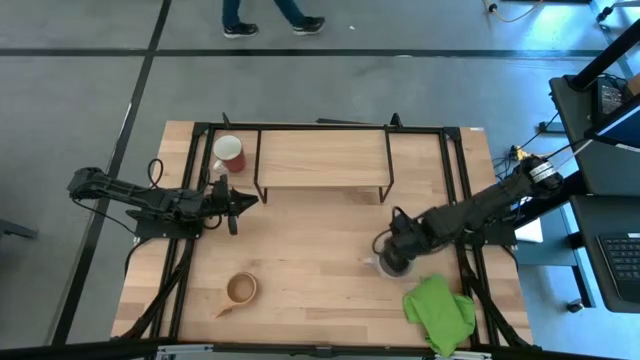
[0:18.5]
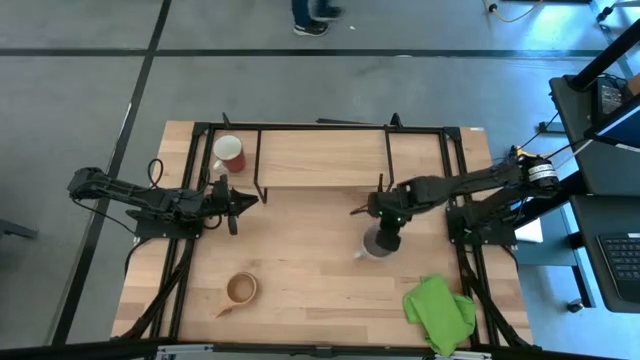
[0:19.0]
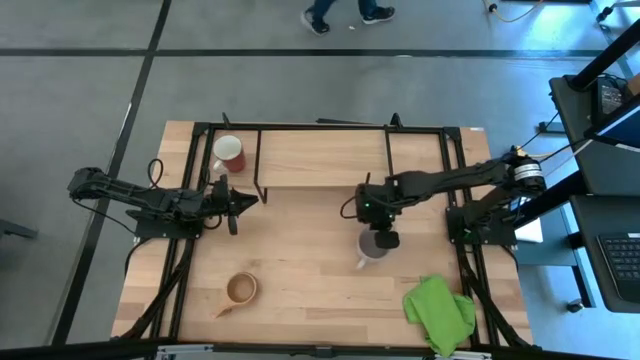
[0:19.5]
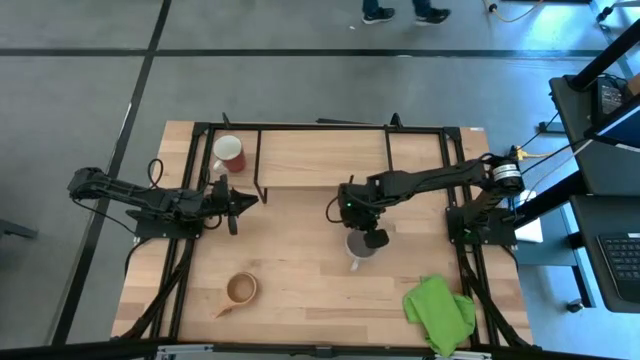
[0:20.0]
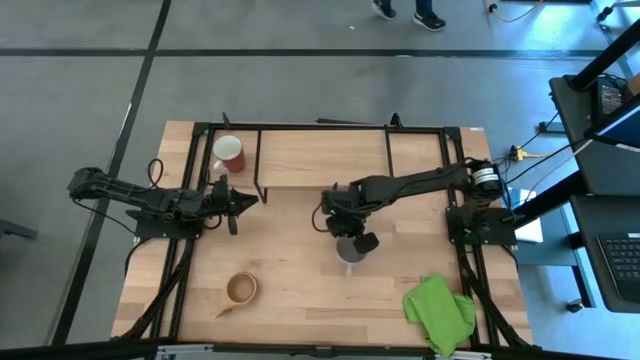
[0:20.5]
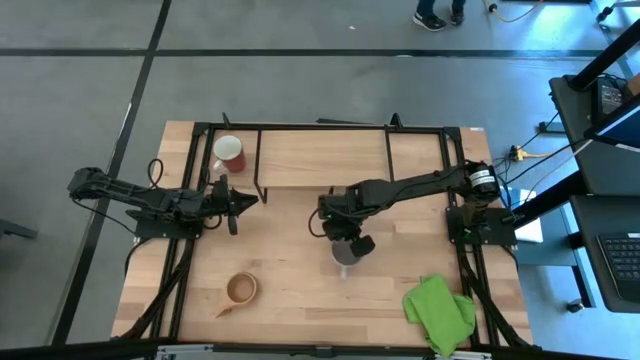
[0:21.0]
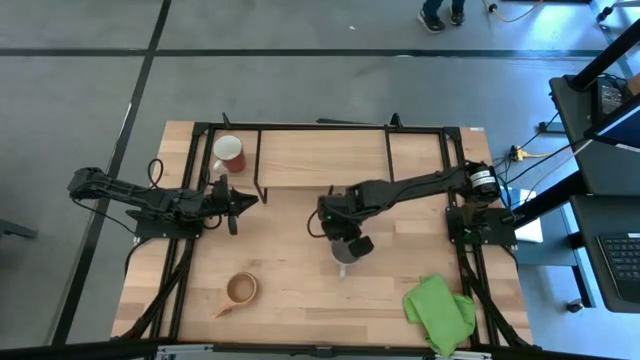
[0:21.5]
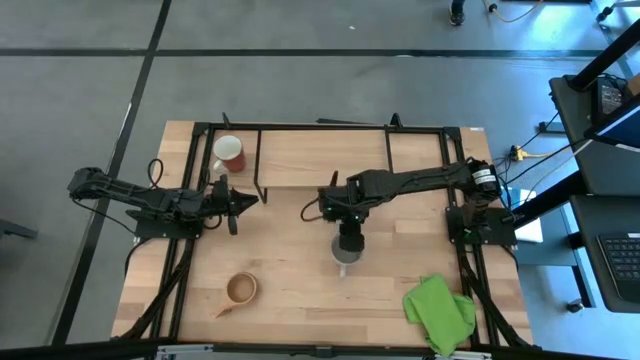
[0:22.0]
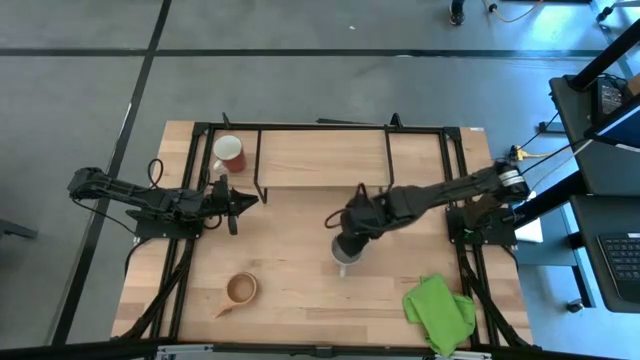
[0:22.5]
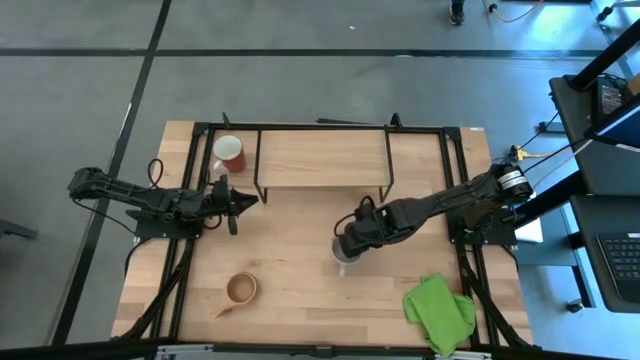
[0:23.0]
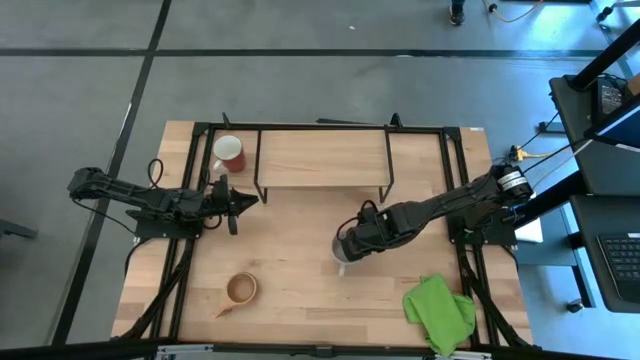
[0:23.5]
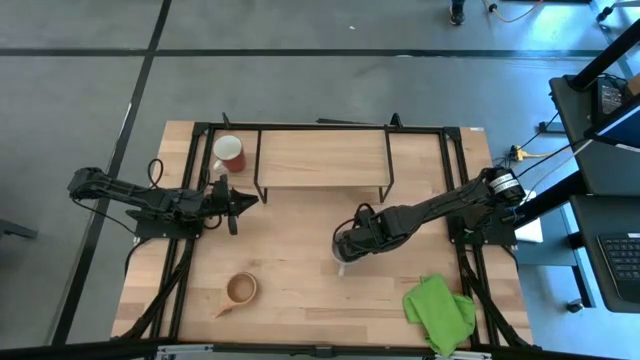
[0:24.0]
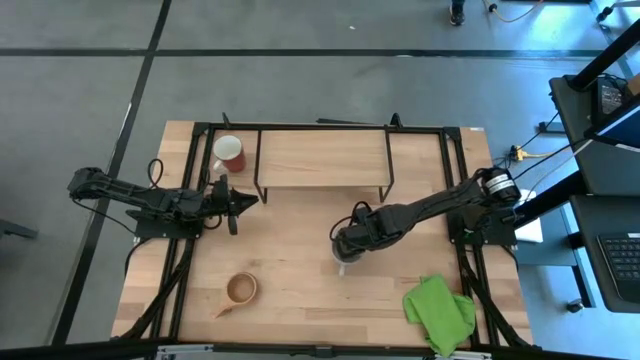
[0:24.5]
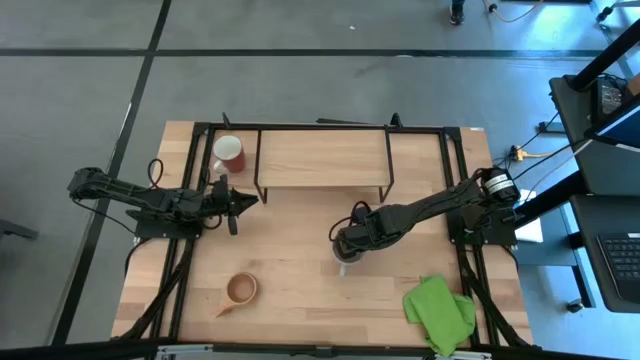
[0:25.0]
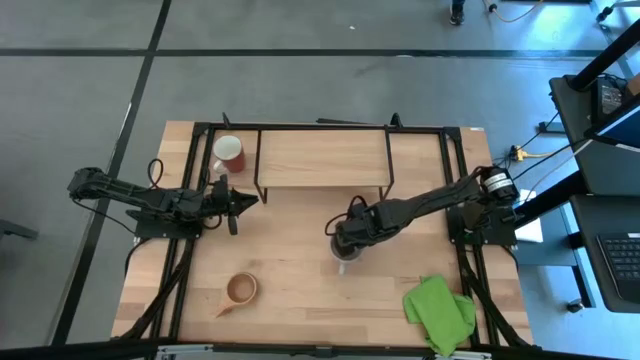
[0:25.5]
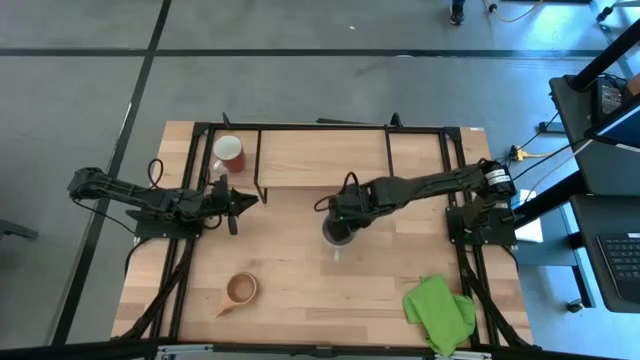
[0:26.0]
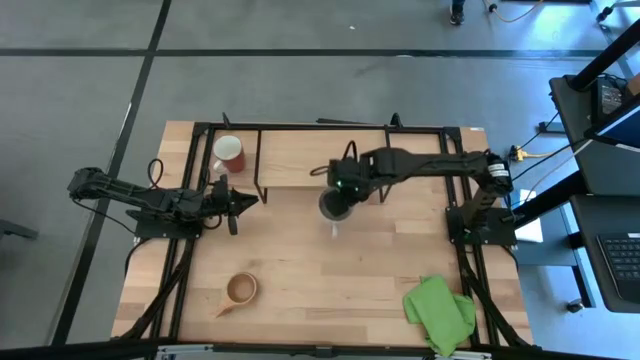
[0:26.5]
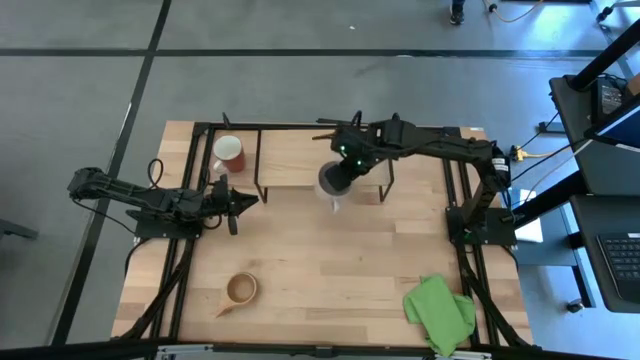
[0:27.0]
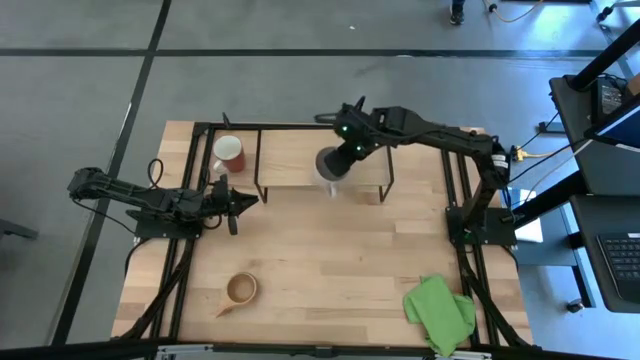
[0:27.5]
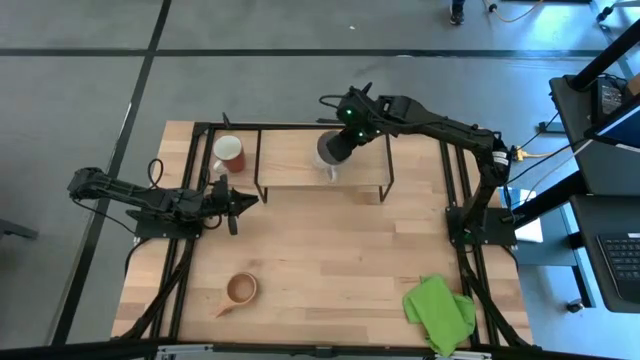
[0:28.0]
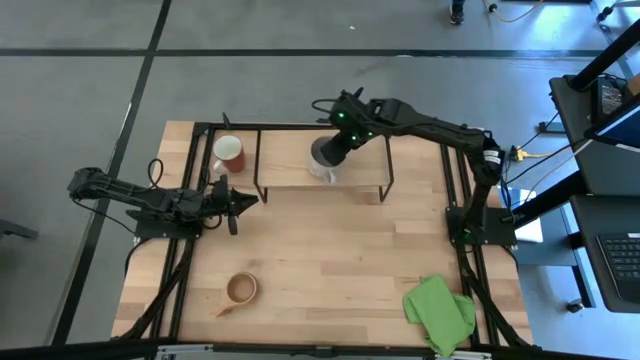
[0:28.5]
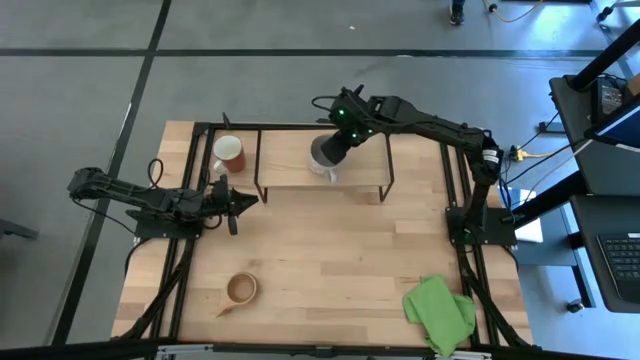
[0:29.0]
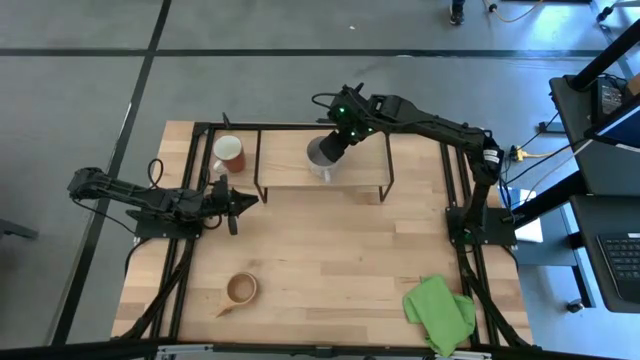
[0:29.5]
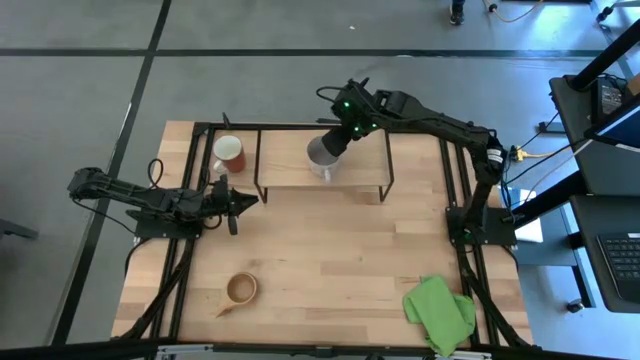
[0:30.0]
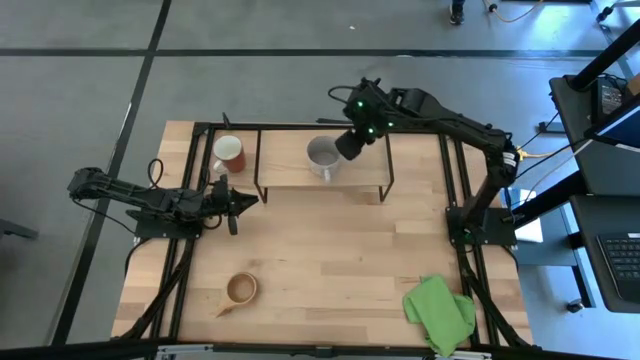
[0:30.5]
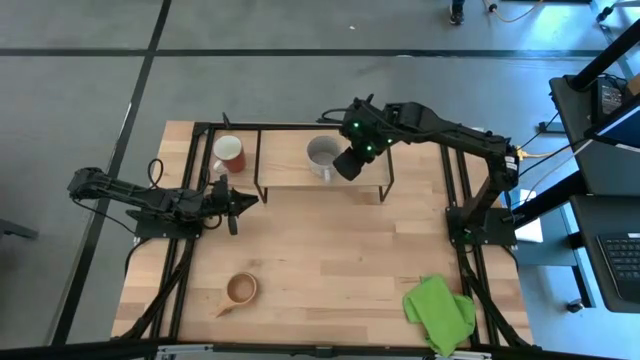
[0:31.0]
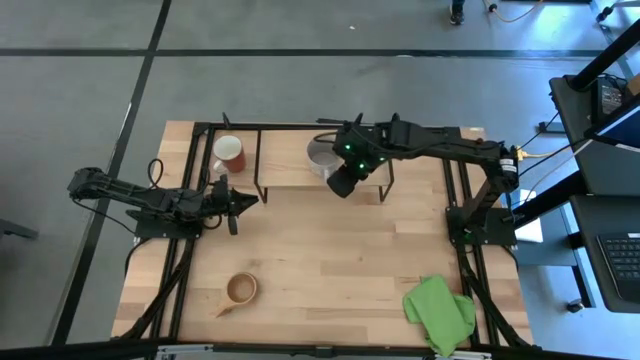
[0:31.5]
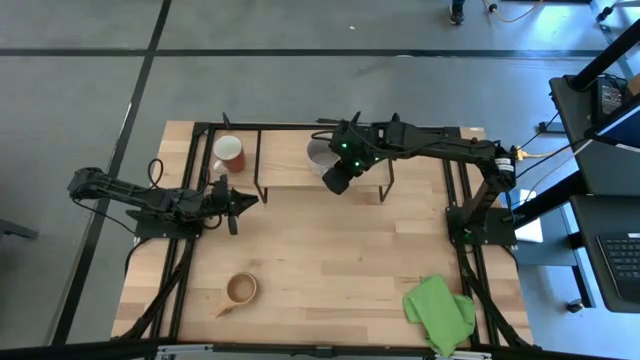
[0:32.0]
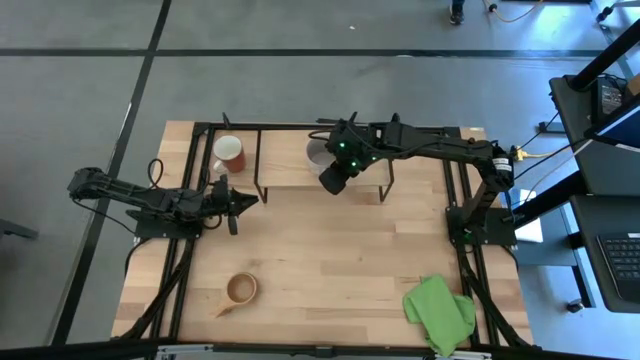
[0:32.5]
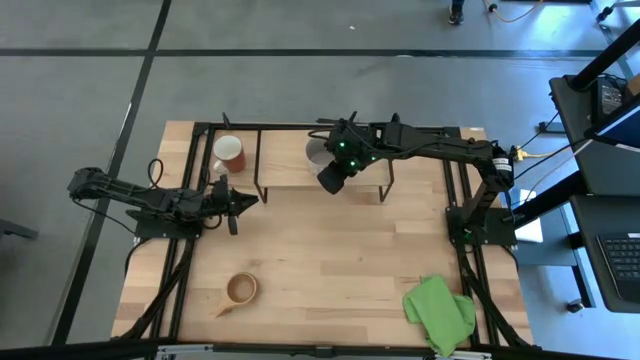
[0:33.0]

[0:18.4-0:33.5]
Task: Stack small to large cups/mugs on shelf
Put the gray mug on the shelf
